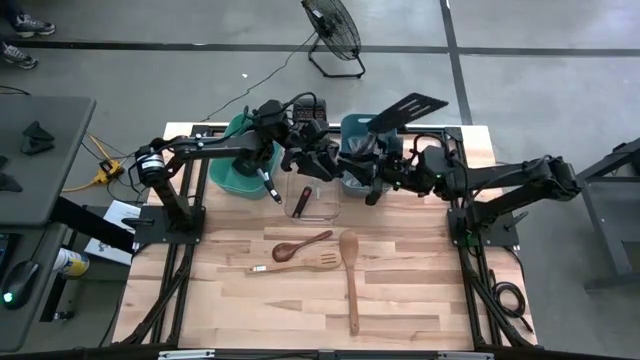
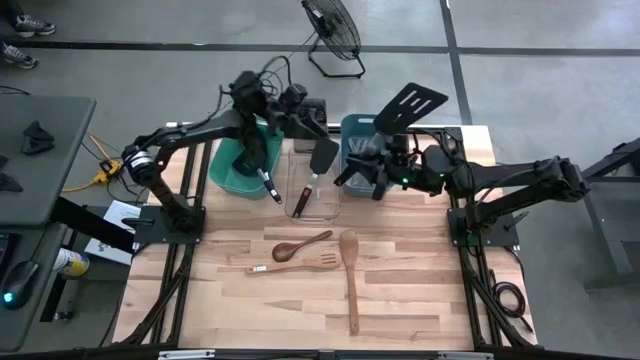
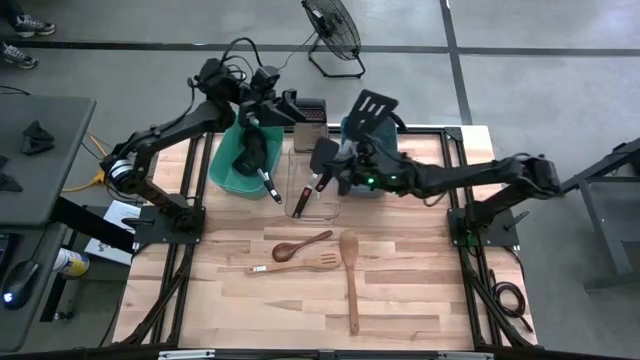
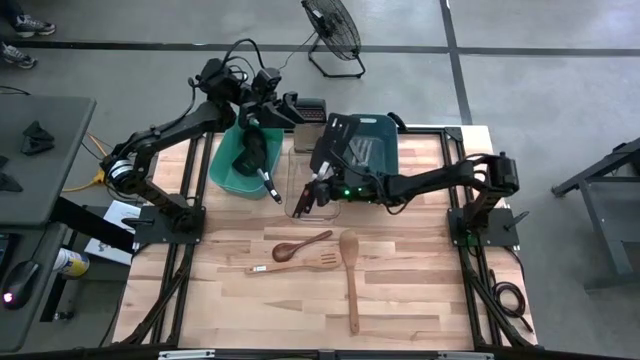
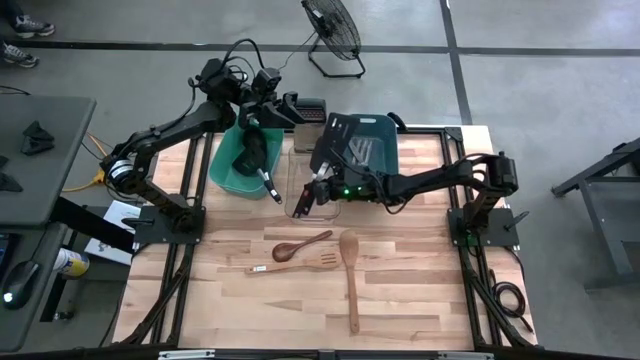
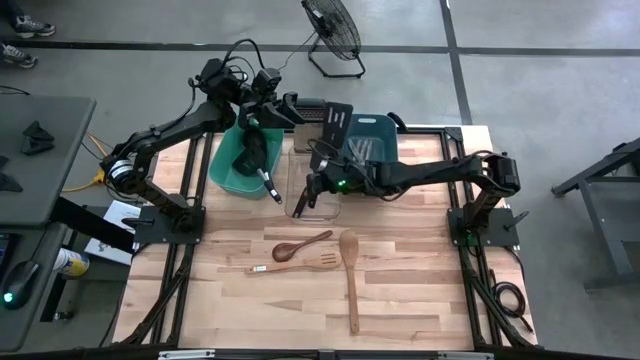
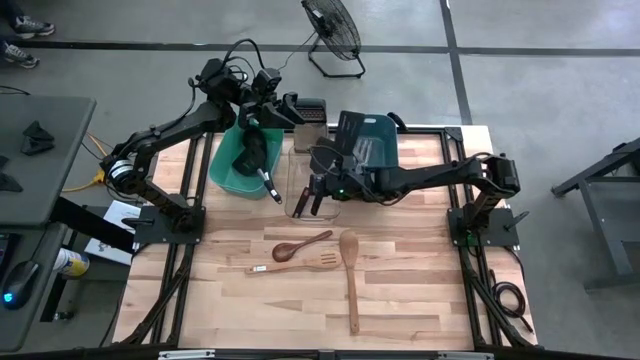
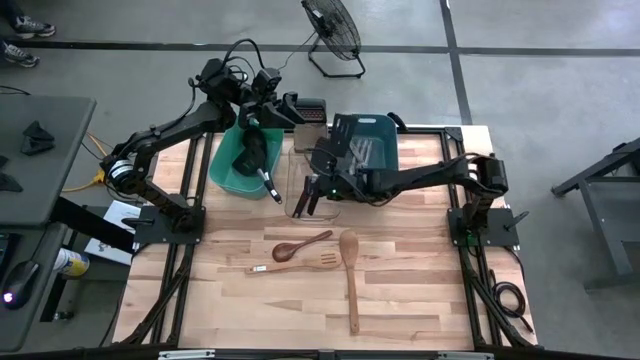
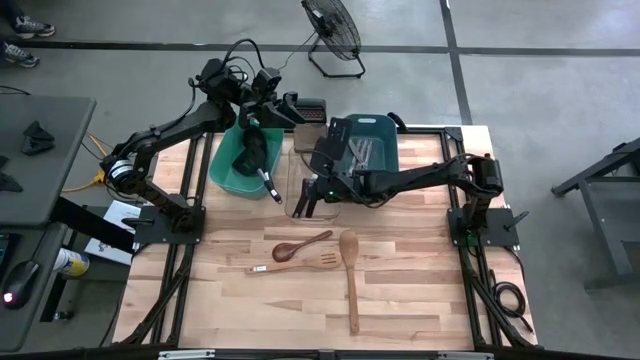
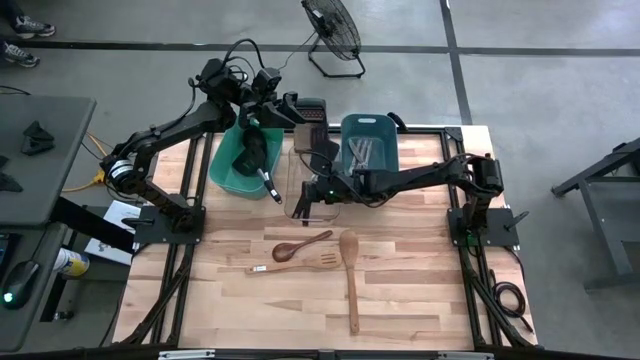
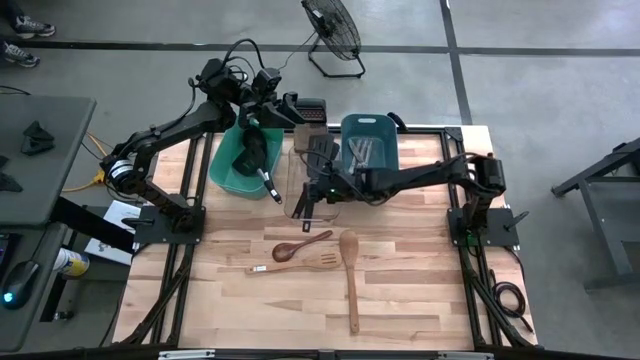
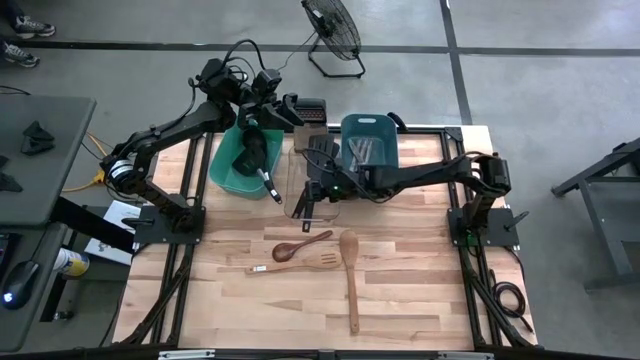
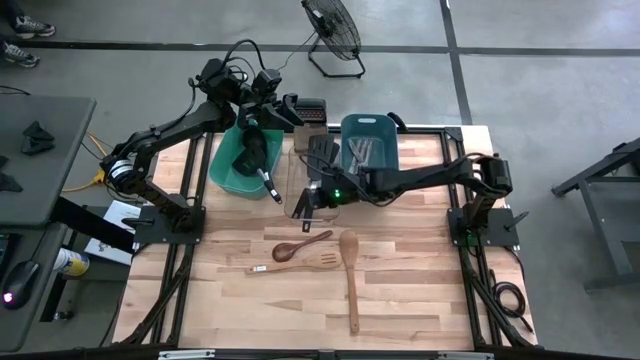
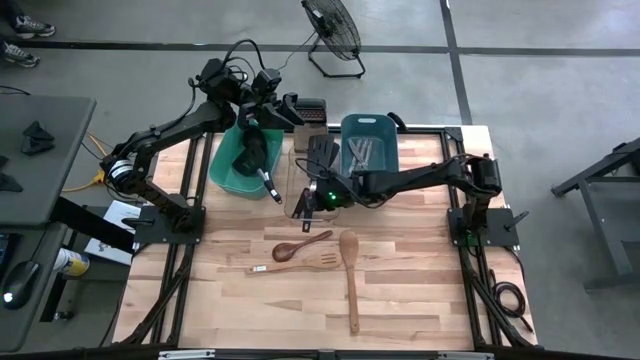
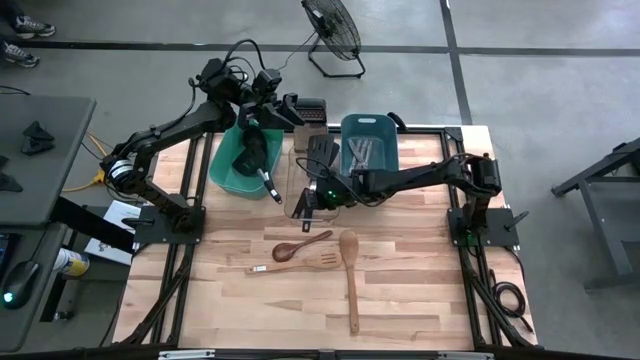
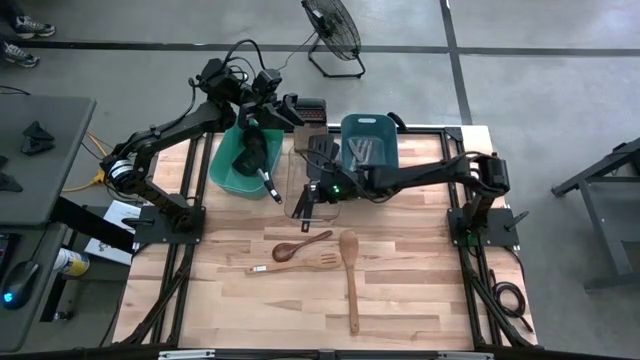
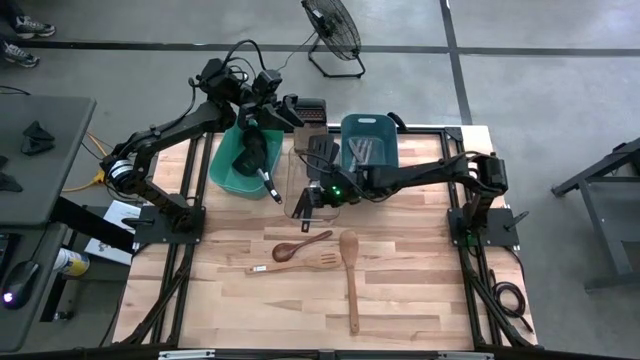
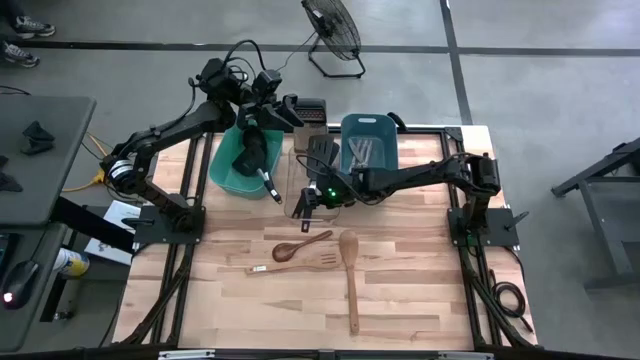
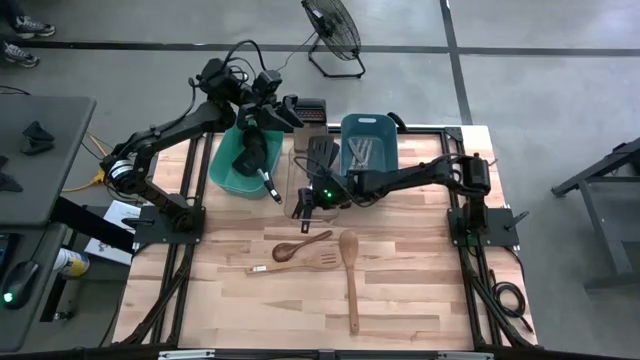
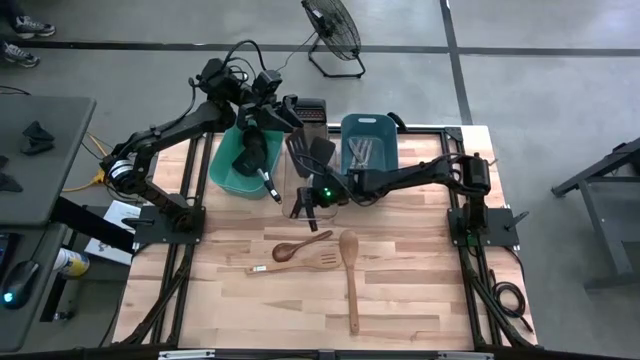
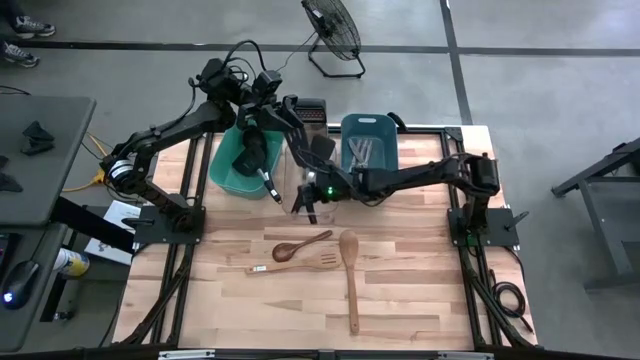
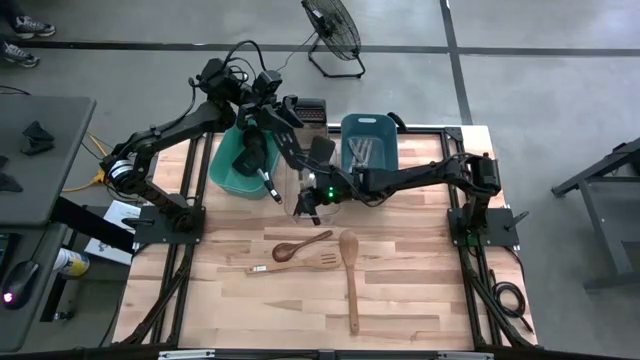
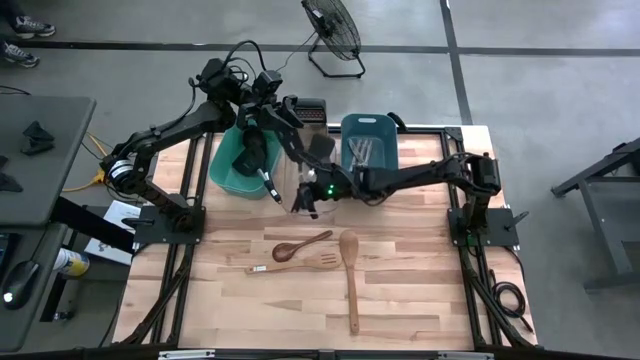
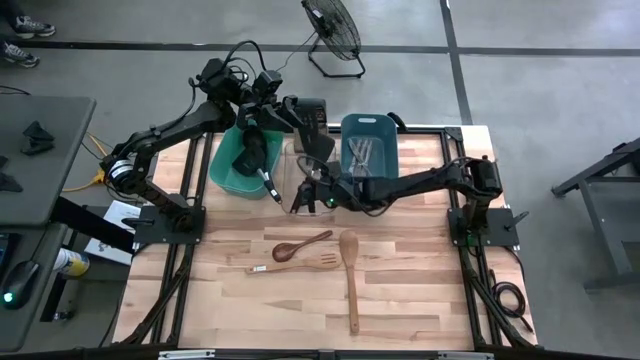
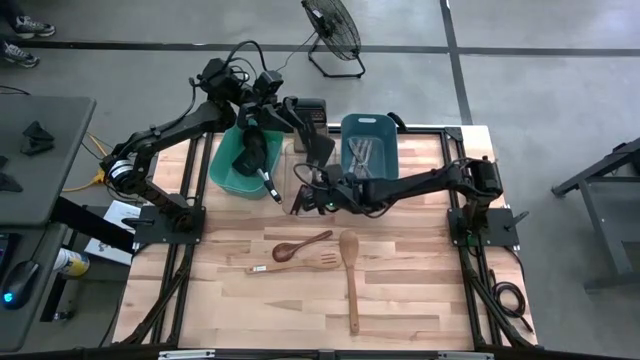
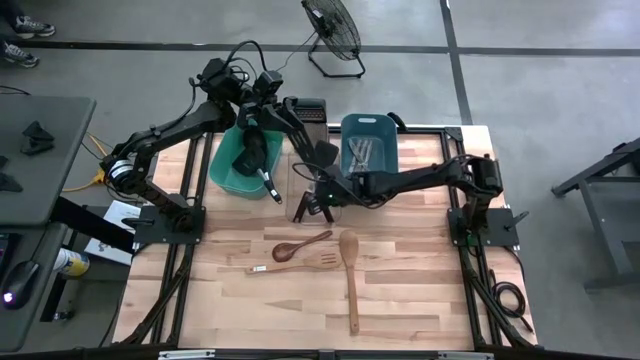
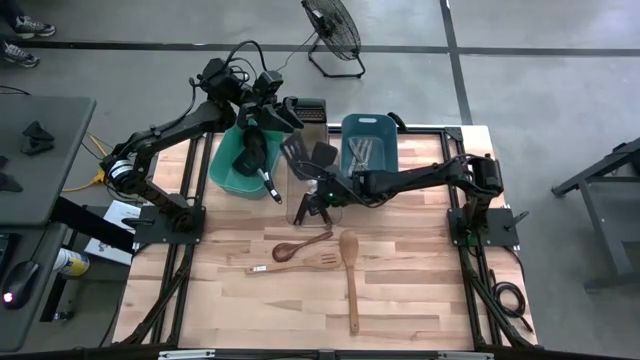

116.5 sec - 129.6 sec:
Task: Pick & Place Kitchen Items
Put the slotted spatula into the transparent bin

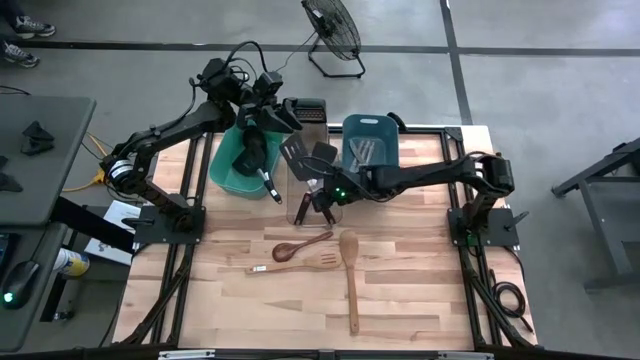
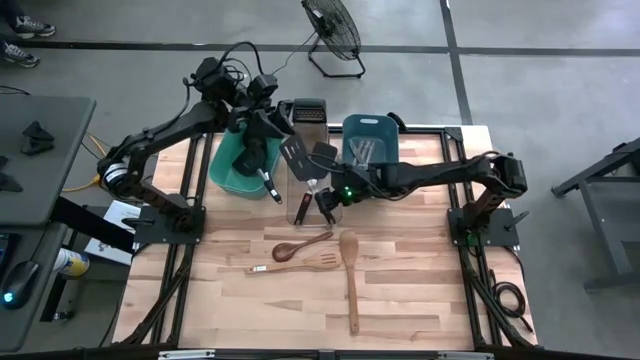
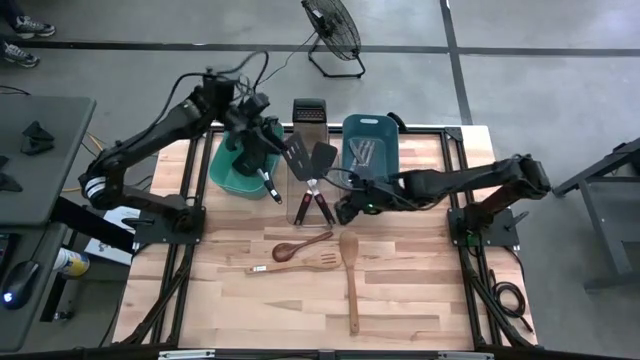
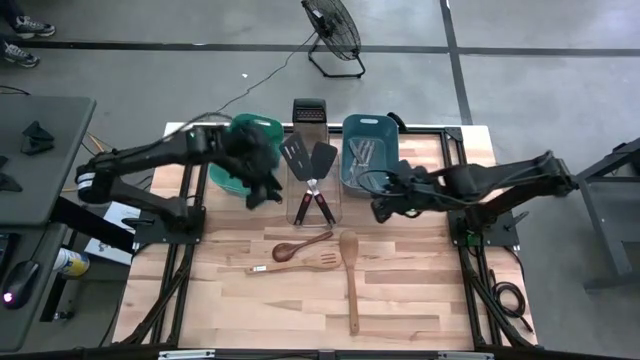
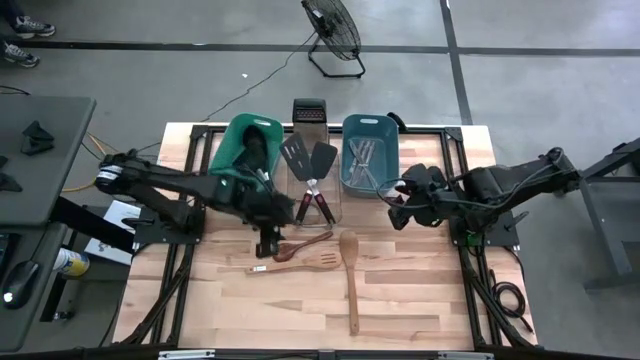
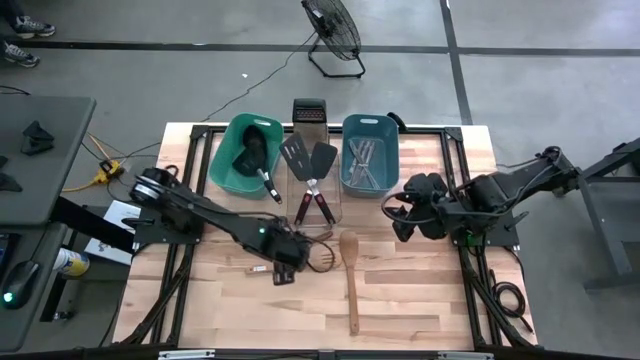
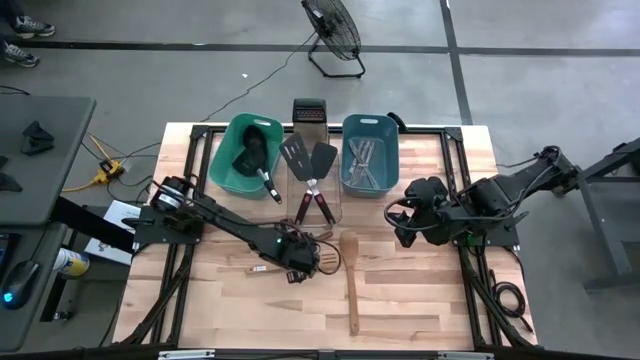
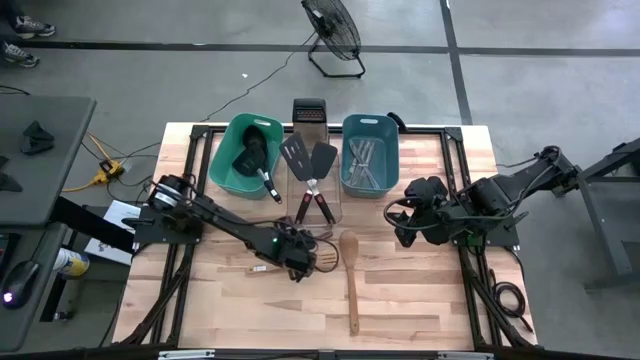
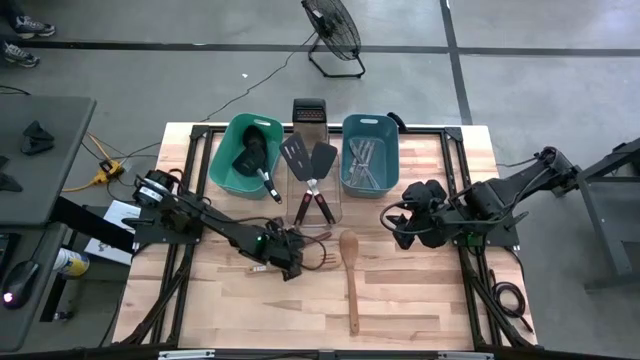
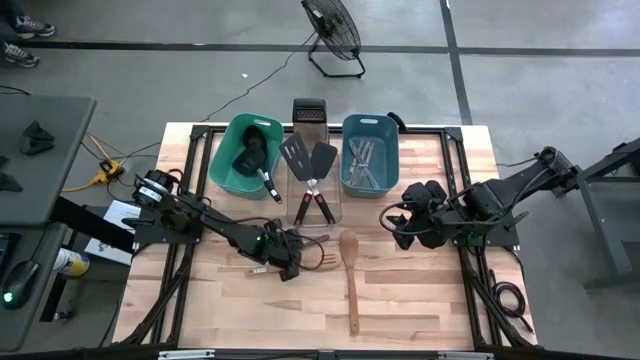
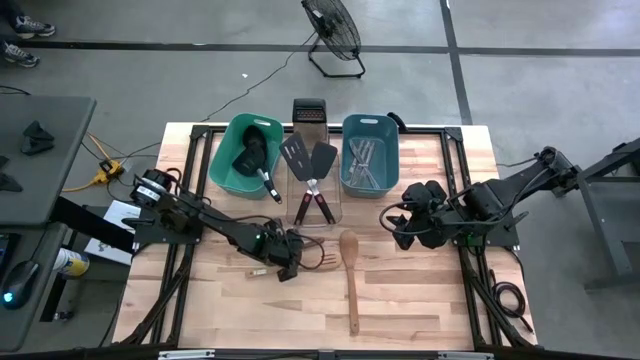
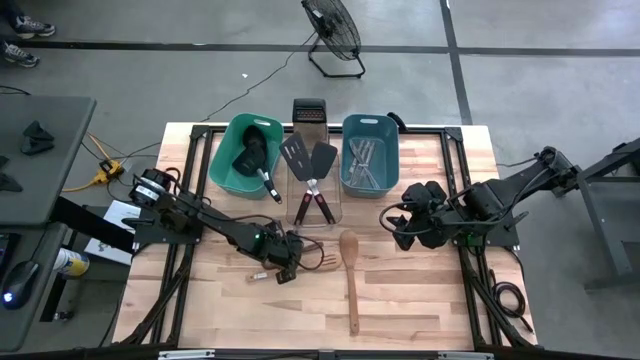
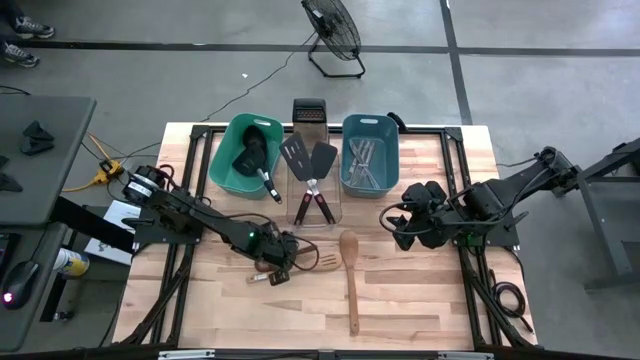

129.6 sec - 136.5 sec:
Put the wooden spoon into the green bin

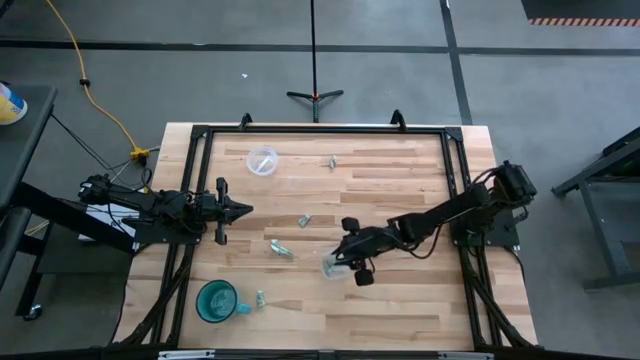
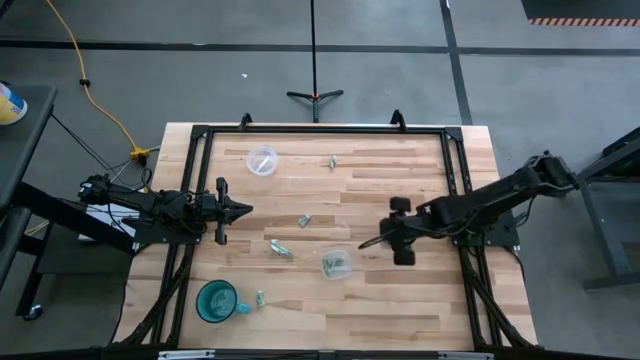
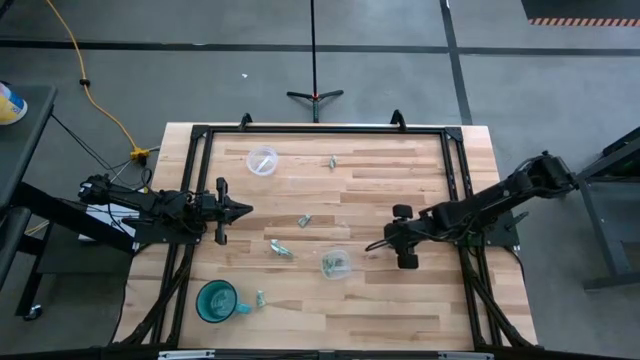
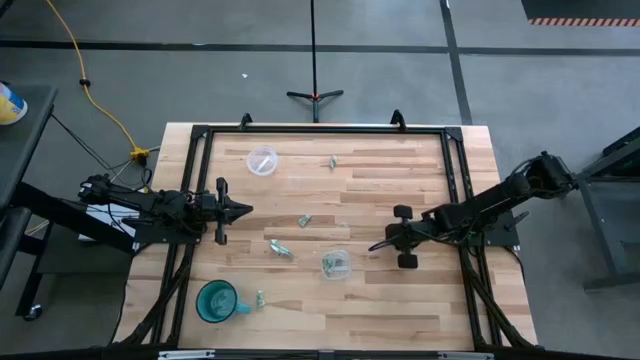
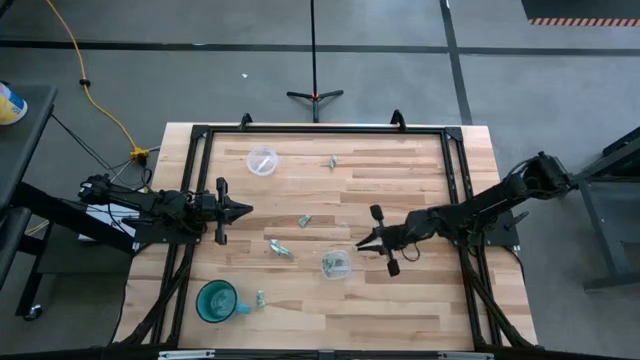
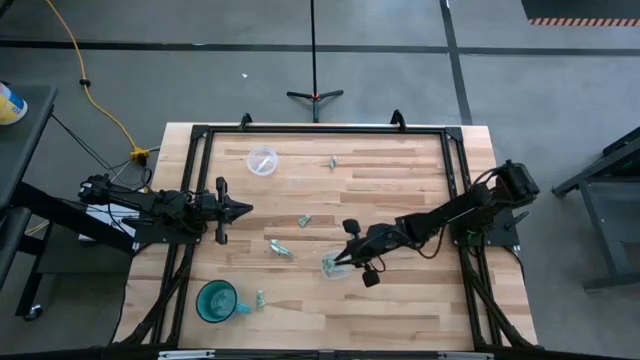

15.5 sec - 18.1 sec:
Task: Pick and place Stevia / Truvia into bins
Put the stevia packet into the bottom transparent container
